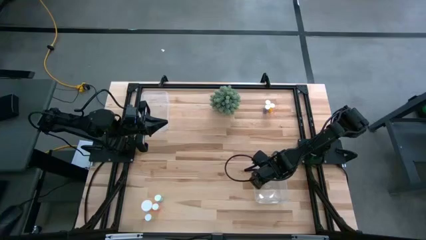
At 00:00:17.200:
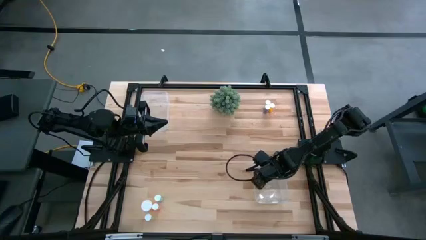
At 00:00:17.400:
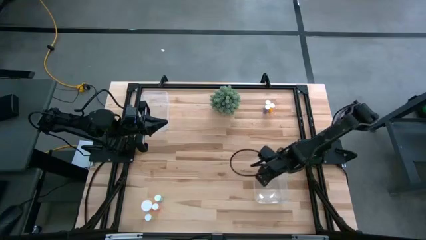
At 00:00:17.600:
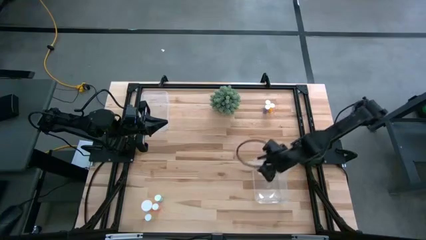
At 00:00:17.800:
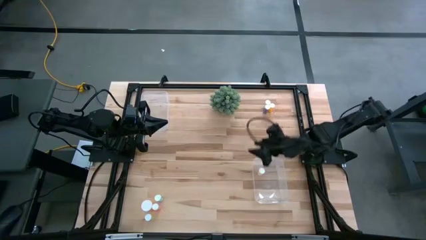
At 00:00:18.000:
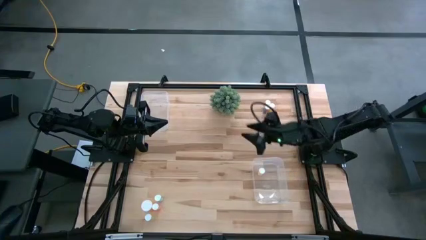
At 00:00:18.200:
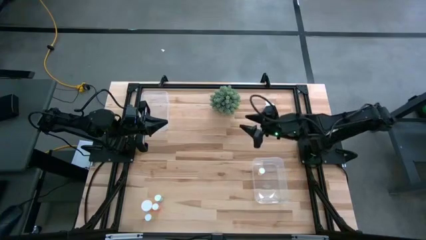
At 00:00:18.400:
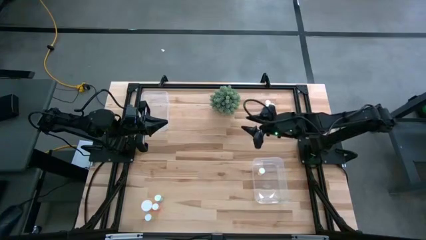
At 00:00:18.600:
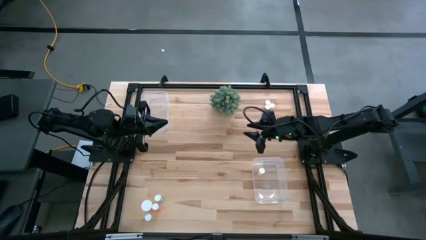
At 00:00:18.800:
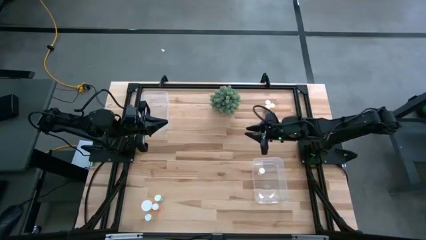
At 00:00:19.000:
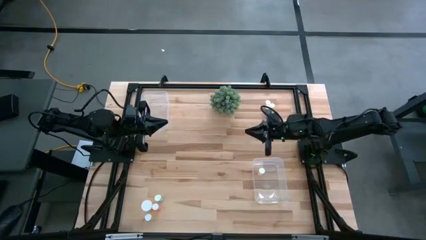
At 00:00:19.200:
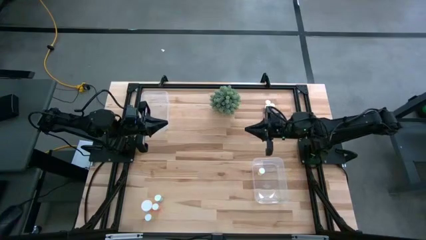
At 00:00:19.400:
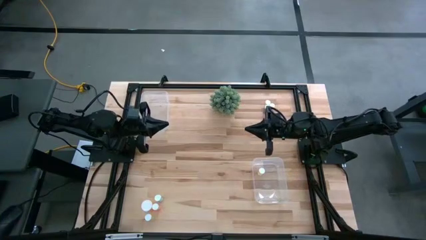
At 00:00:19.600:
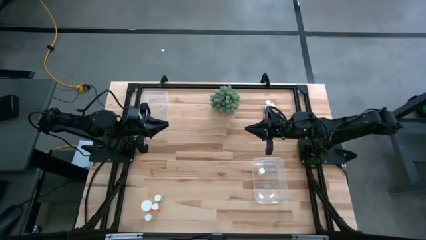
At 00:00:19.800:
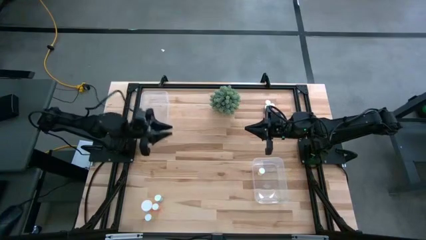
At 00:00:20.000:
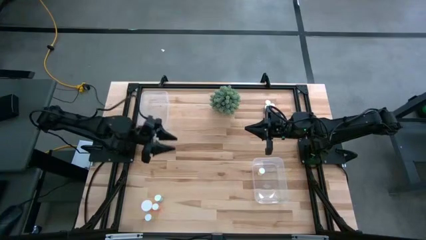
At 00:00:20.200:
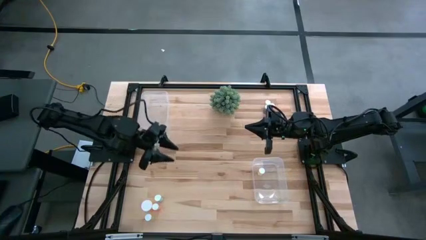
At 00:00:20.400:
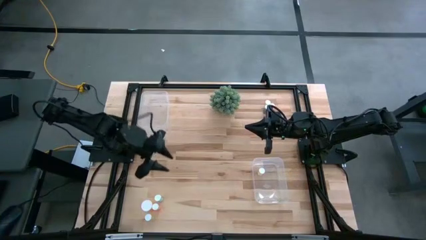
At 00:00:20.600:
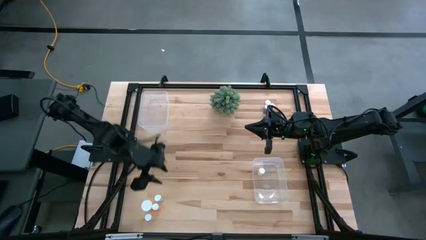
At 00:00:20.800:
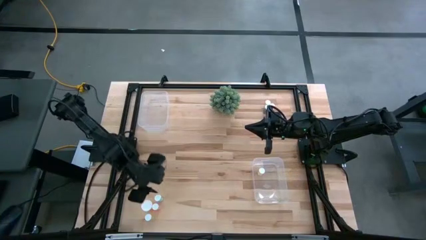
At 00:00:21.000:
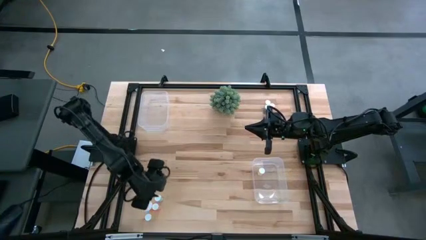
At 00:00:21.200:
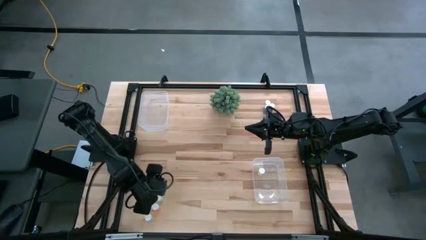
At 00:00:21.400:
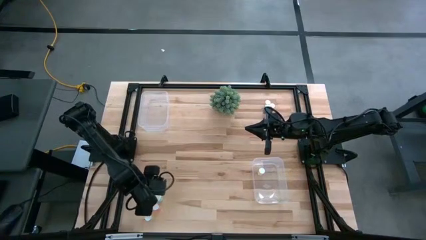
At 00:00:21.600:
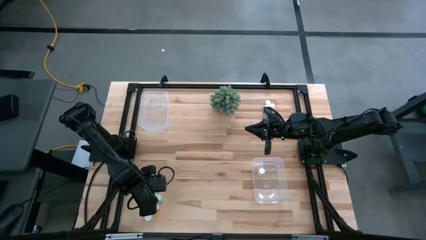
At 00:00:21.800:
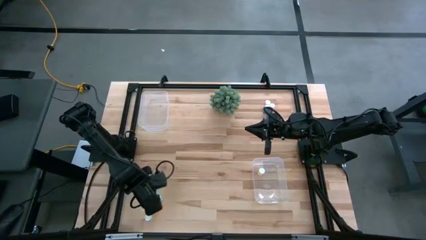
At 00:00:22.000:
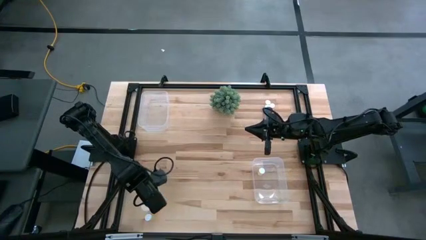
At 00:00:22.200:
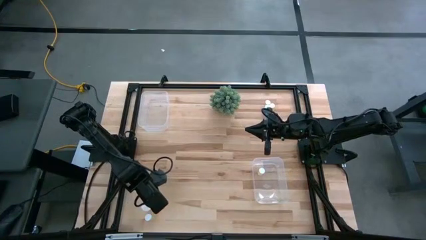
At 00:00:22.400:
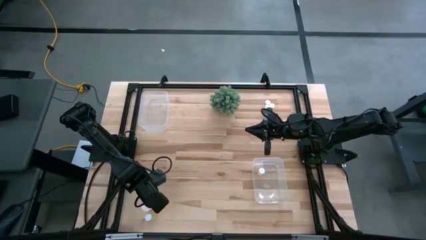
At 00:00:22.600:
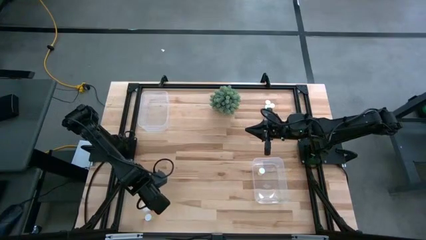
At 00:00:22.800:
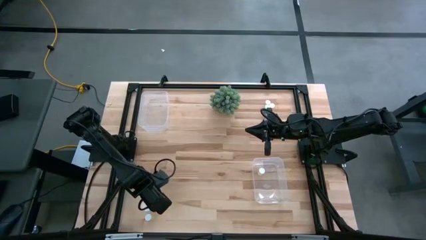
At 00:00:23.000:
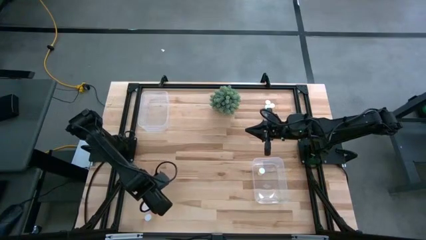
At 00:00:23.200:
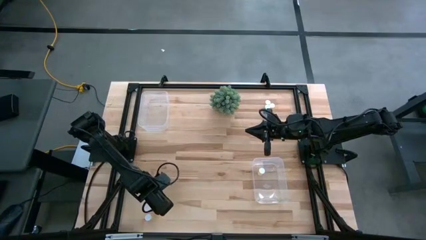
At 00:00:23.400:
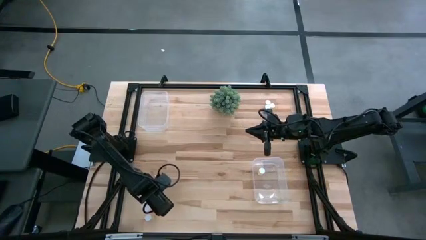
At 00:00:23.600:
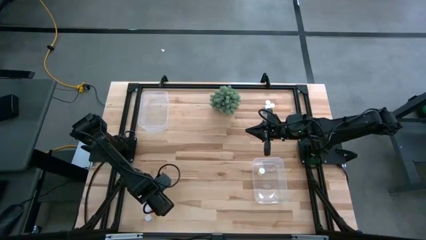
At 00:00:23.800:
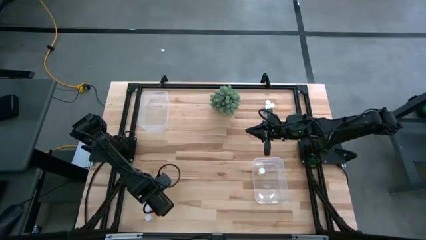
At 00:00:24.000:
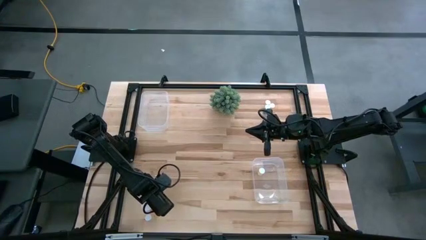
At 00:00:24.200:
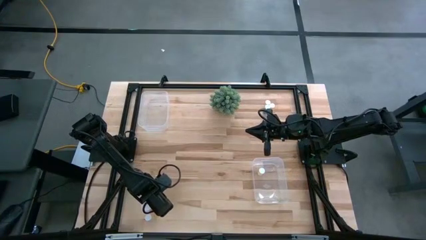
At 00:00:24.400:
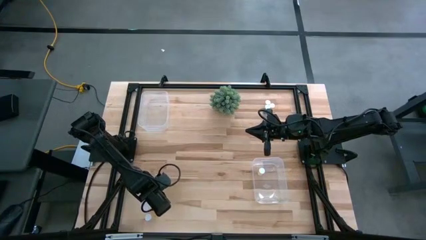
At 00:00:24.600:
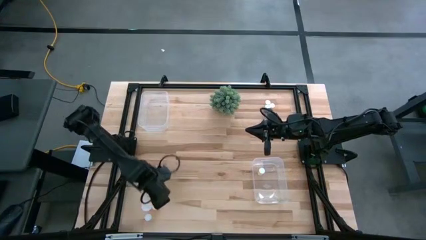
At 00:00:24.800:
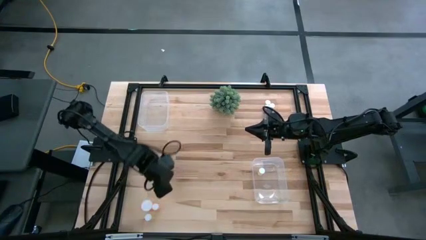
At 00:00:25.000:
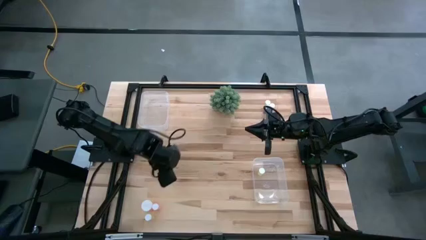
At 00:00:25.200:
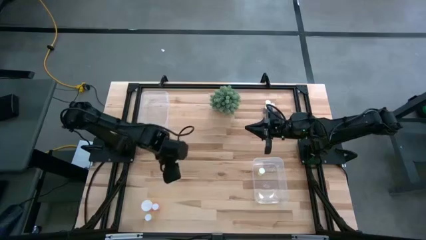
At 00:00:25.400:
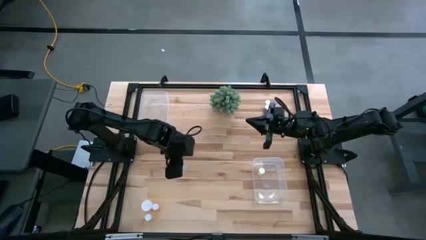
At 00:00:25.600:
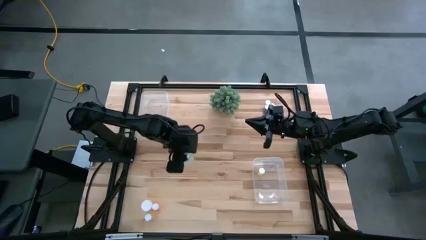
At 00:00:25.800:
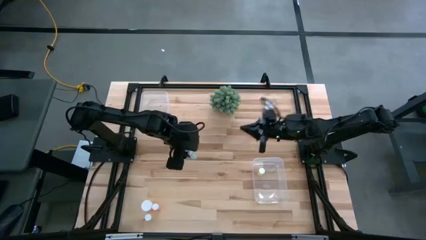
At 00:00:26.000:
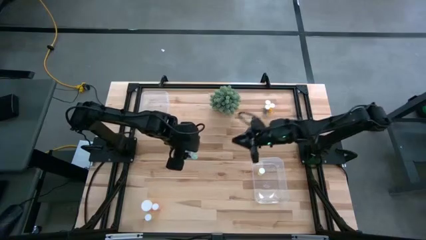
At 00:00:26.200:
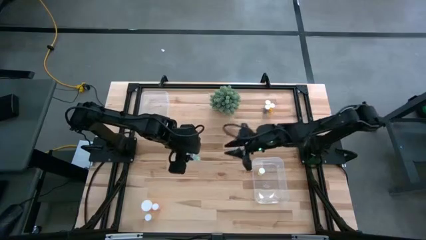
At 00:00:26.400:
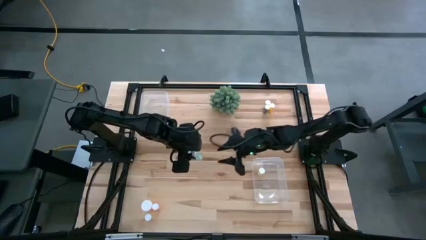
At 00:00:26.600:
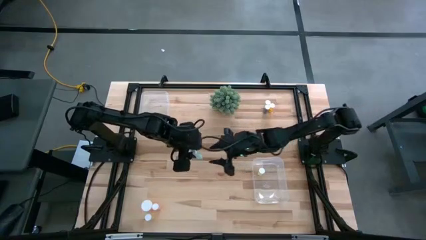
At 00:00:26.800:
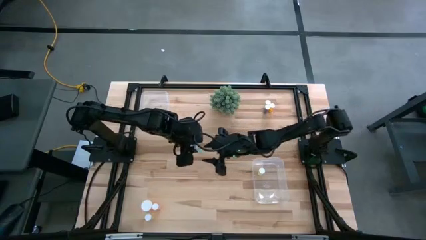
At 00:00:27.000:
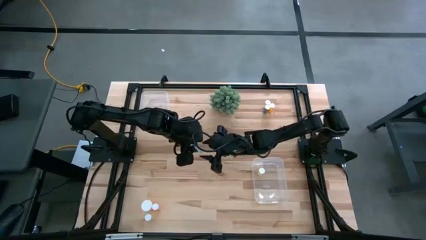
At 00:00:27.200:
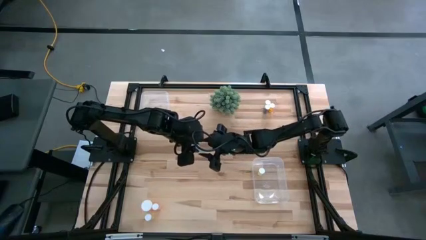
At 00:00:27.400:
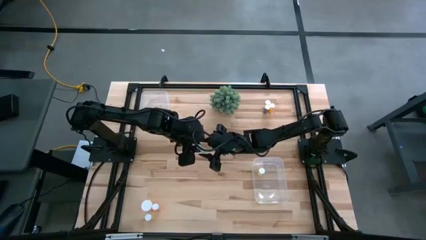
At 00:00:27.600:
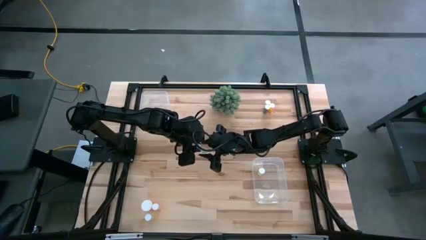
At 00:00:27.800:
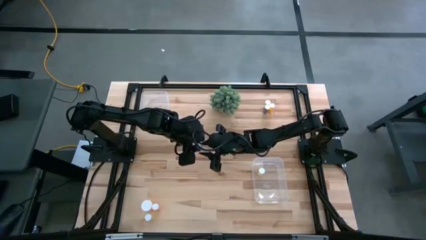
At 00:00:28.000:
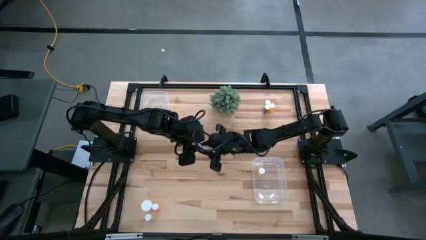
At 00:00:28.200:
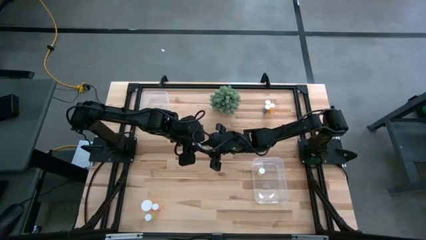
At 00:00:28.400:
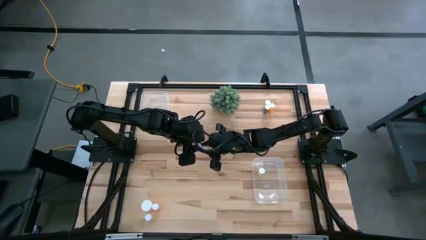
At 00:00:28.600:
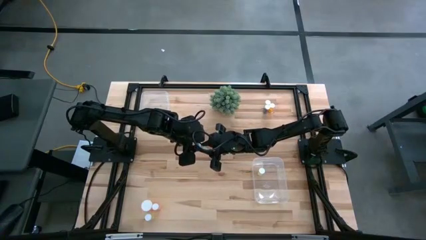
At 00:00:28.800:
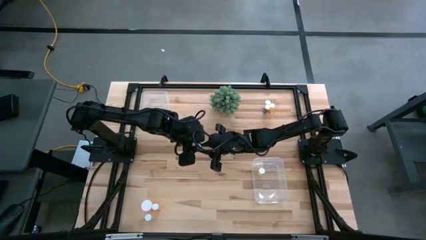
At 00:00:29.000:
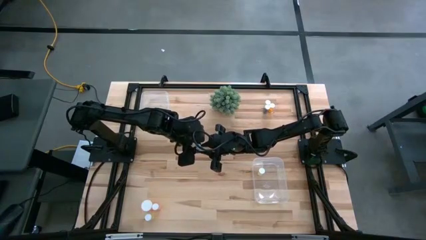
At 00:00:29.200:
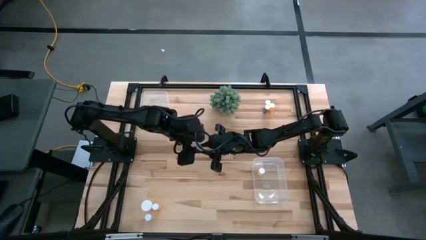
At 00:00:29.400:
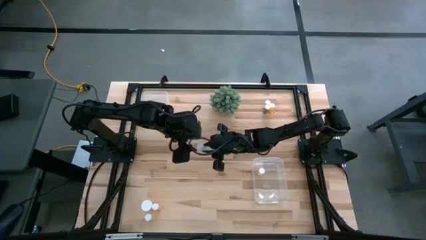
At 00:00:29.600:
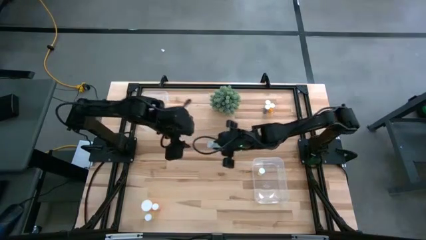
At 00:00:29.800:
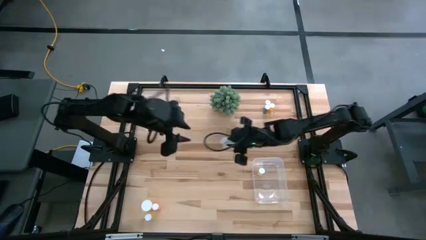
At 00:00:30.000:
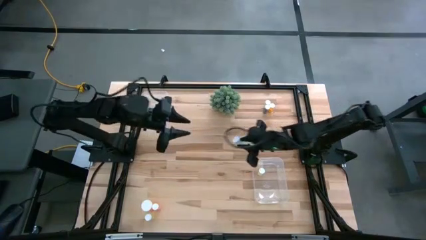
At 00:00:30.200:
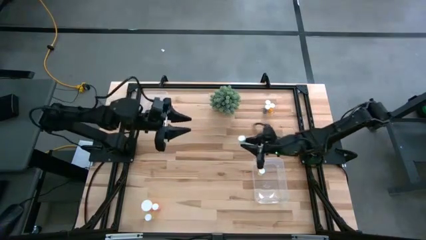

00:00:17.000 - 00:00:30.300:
Task: Pick and place medicine bottles into bin by pill shape (circle, oval)
Put the left light blue tablet bottle into the right transparent bin

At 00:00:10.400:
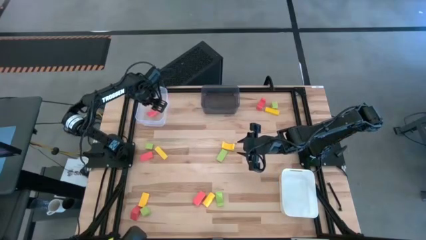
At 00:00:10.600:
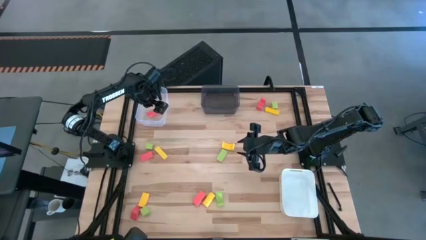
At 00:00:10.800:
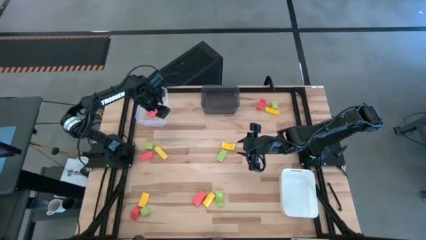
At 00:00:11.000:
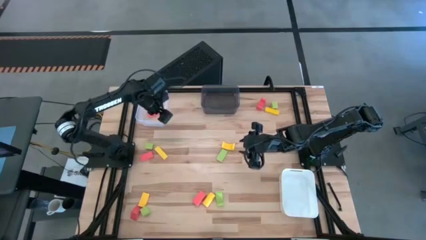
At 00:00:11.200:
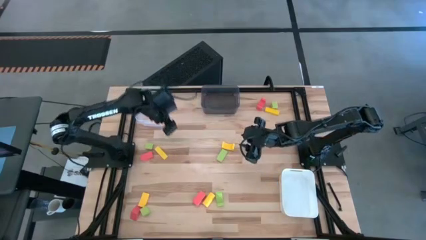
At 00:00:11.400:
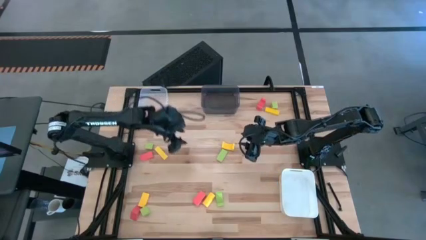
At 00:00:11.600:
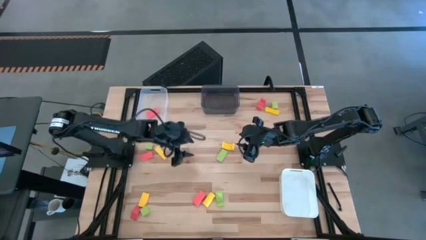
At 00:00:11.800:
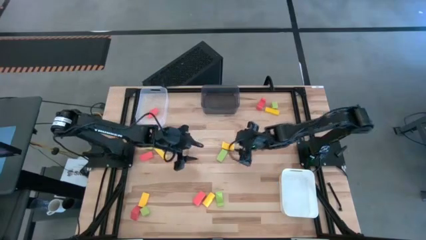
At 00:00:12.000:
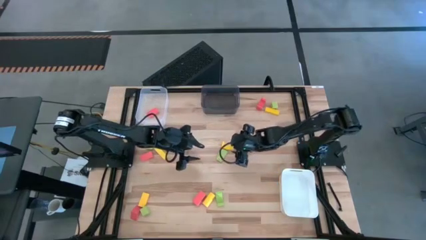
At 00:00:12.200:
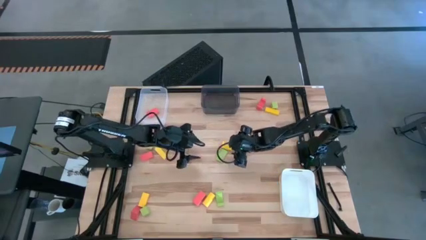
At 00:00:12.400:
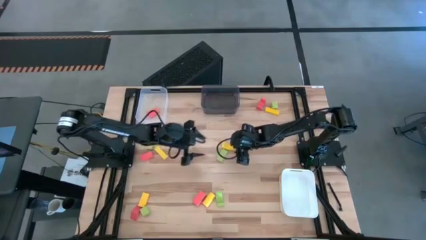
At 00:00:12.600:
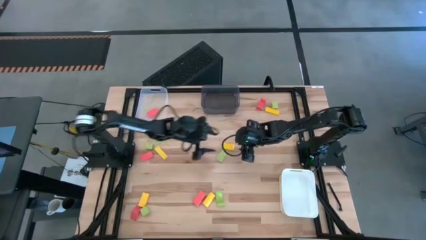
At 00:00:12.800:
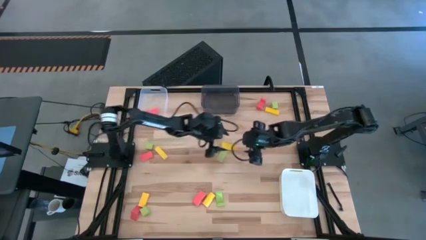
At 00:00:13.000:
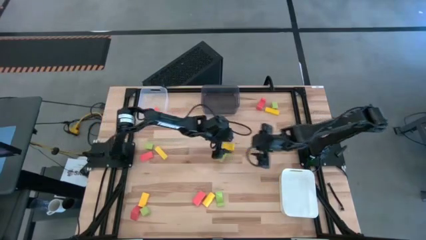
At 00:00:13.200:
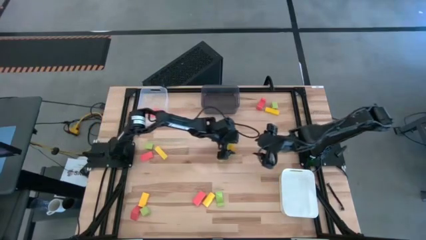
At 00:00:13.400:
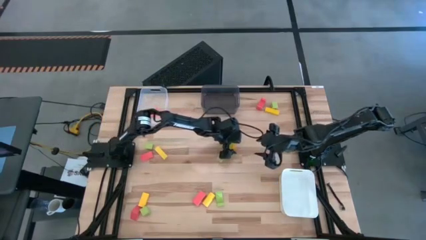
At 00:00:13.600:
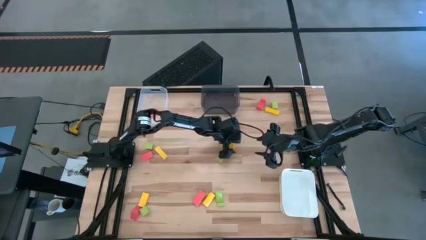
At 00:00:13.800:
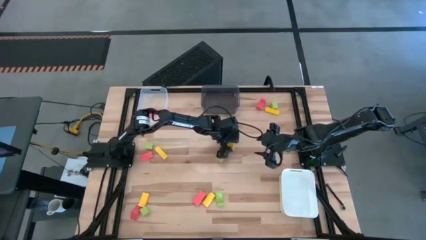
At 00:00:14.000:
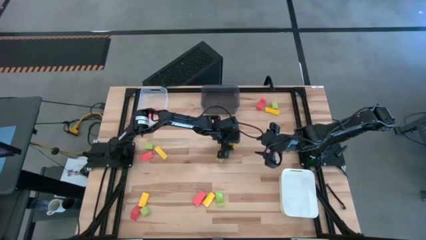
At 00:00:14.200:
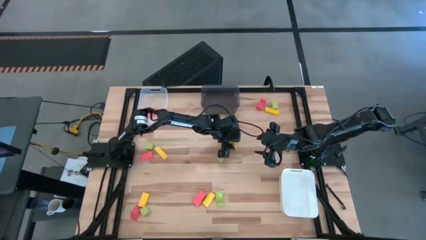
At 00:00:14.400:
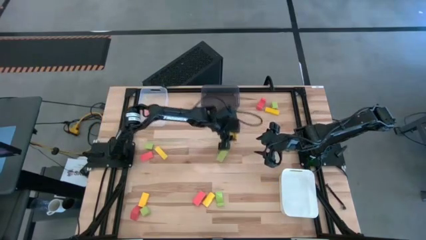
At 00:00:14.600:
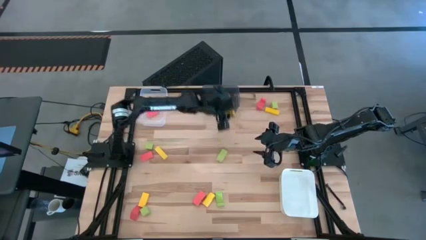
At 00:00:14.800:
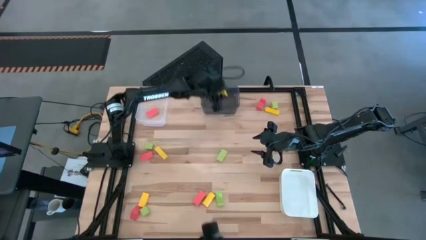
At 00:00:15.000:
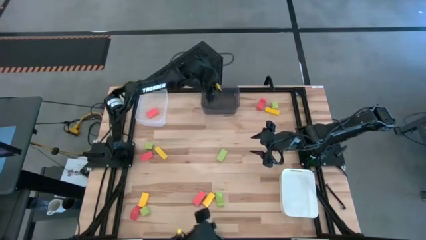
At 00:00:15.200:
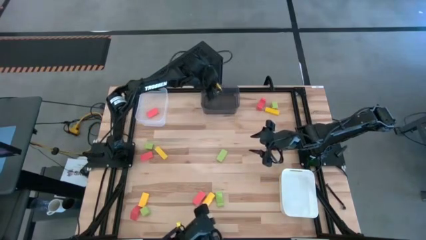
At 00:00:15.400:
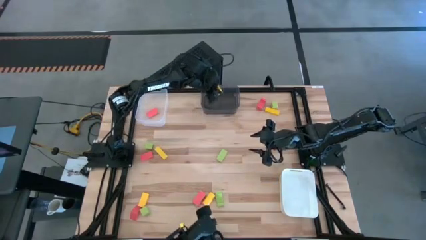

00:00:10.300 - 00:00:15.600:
Task: Sort & place blocks by color
Put the yellow block into the black bin
